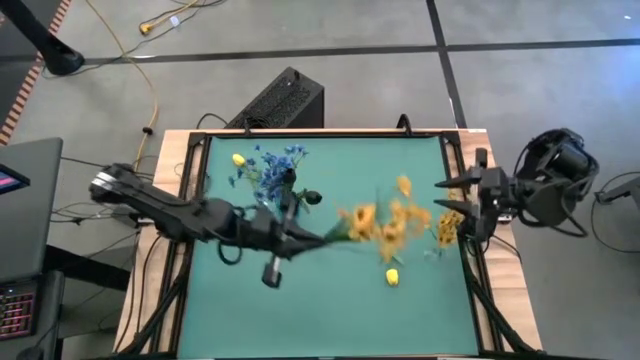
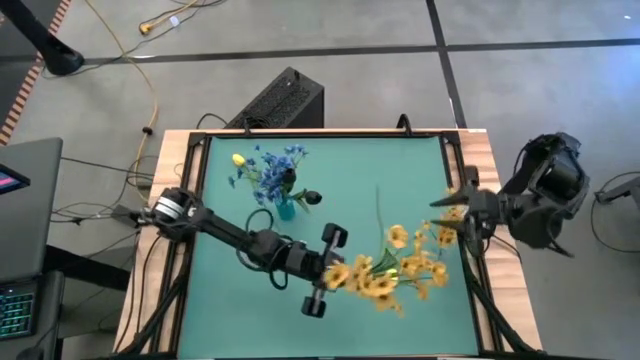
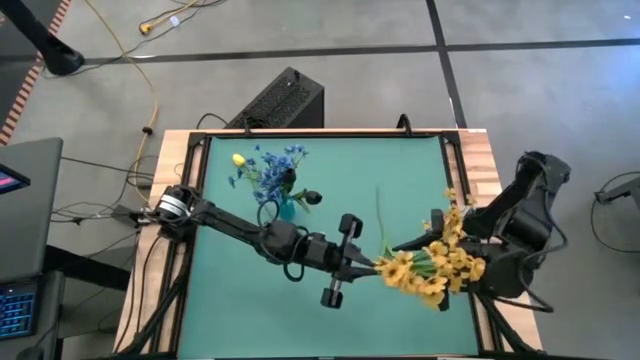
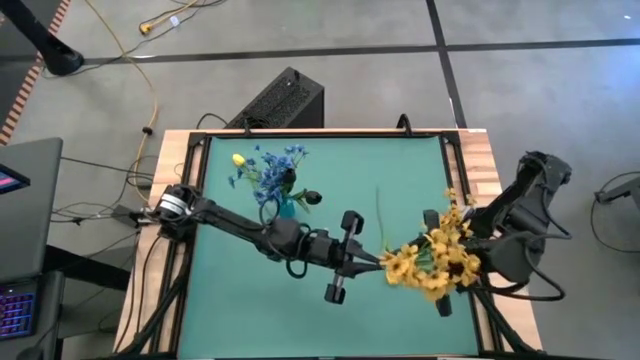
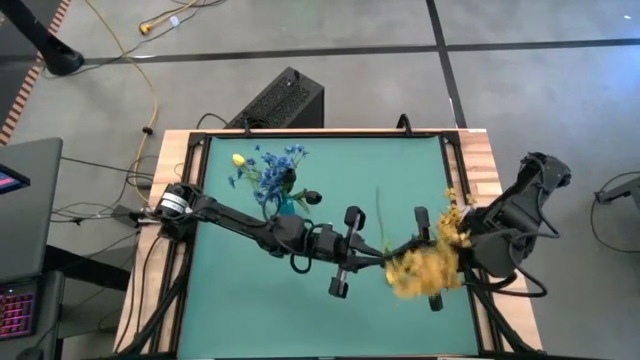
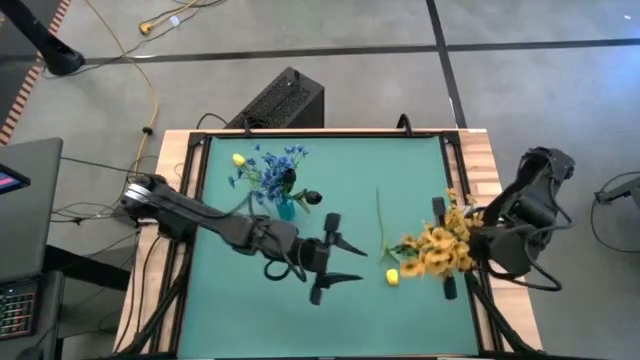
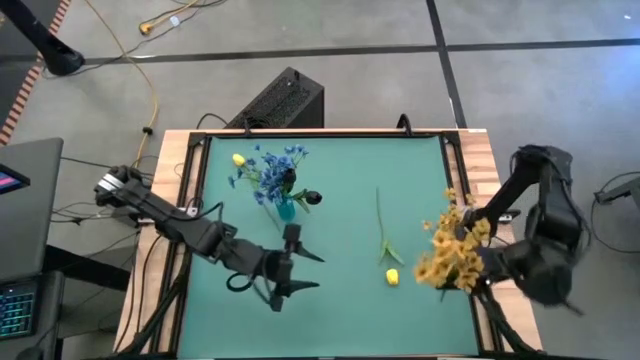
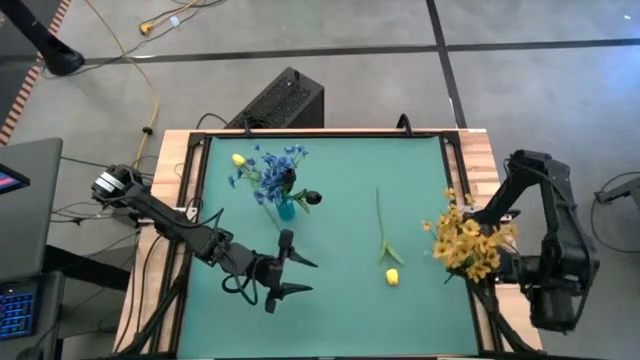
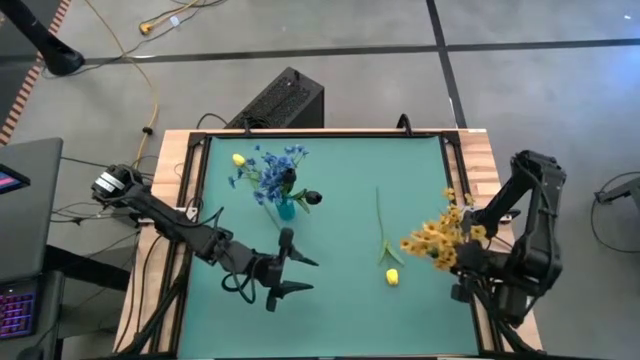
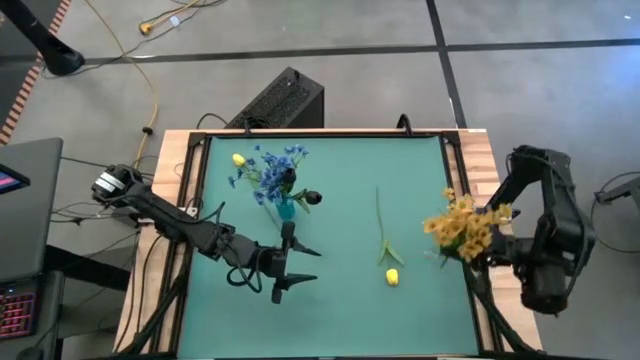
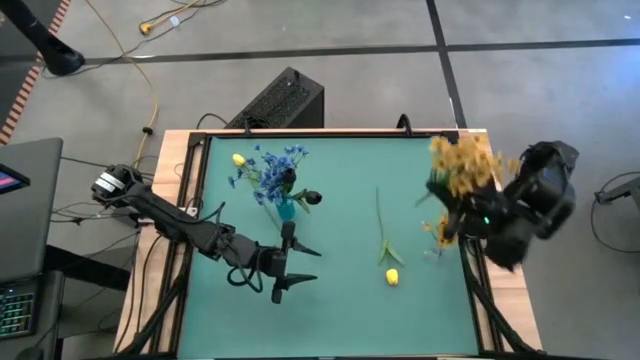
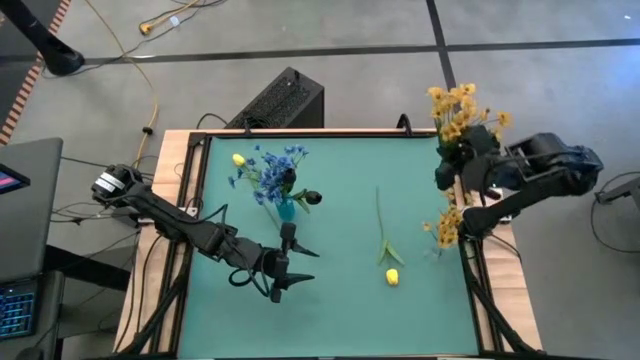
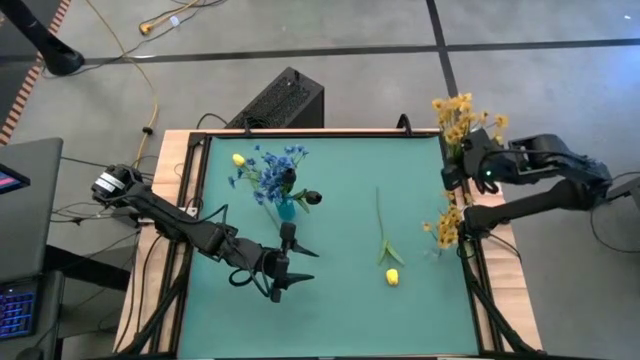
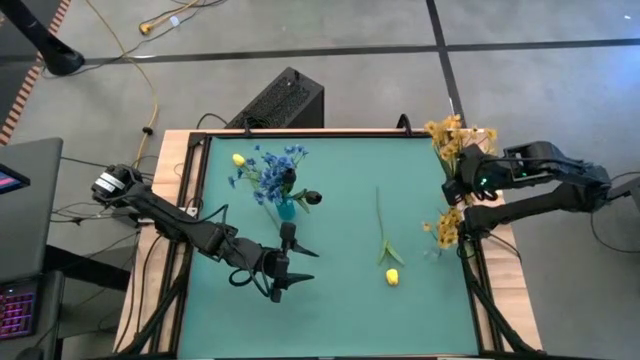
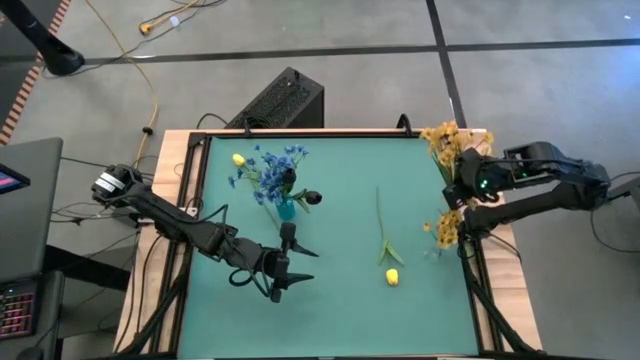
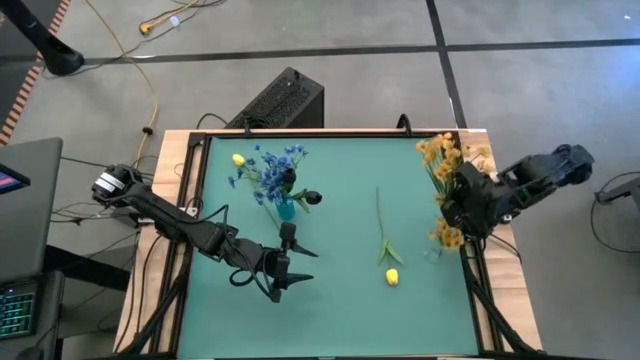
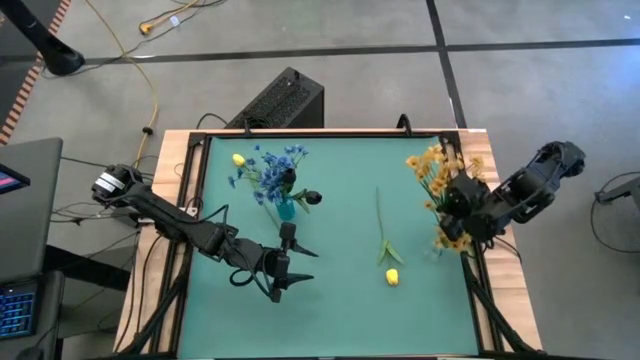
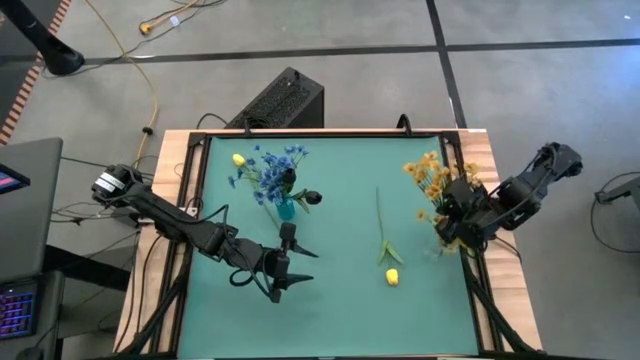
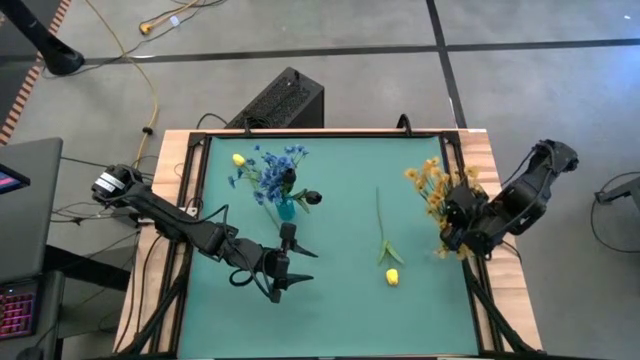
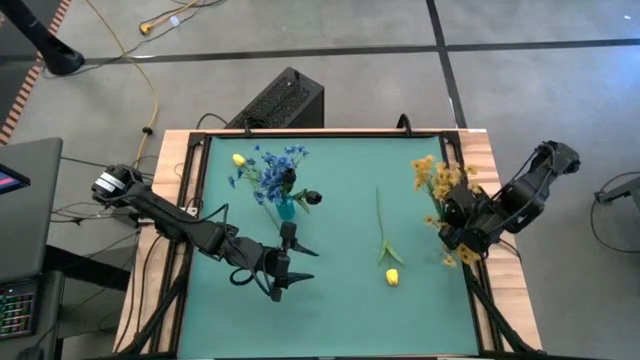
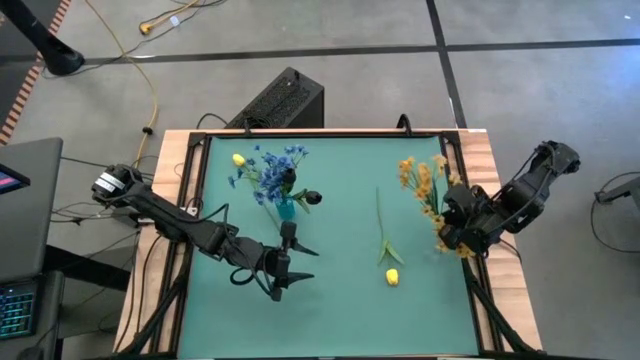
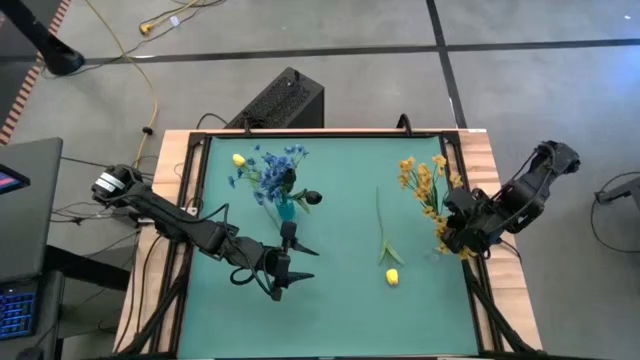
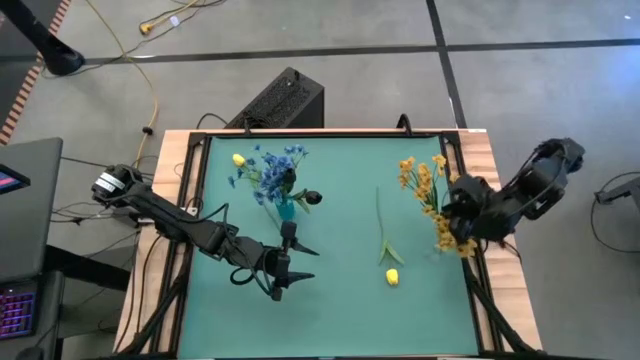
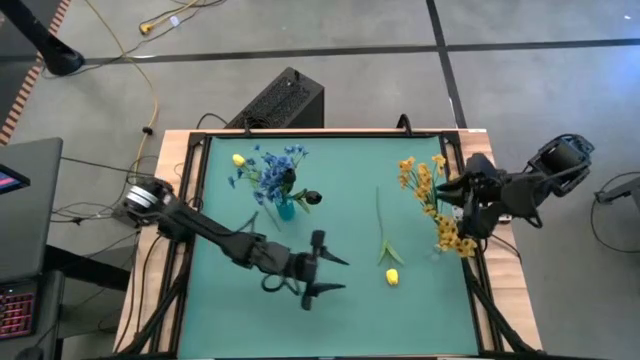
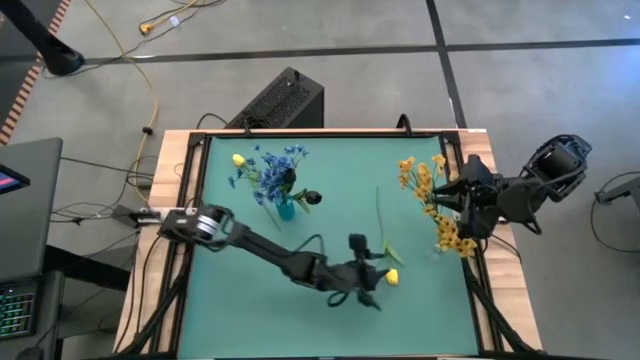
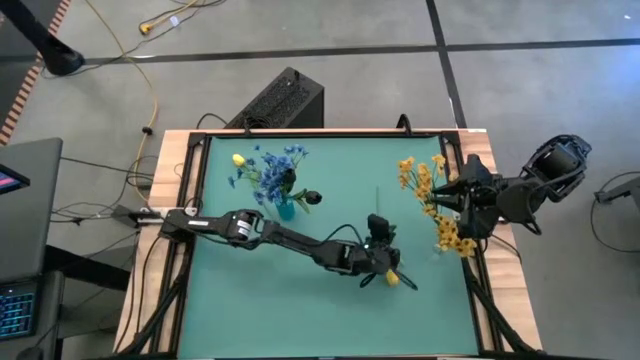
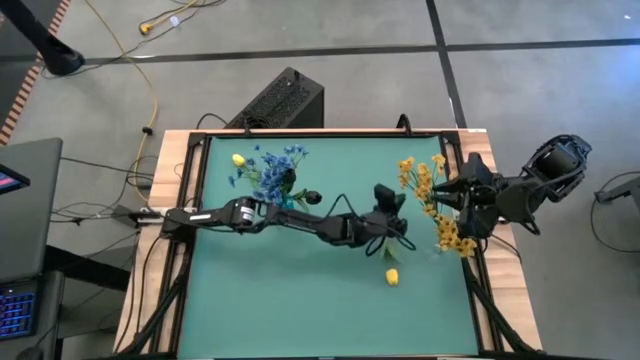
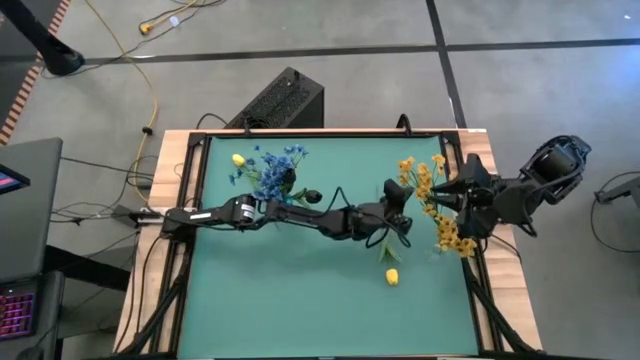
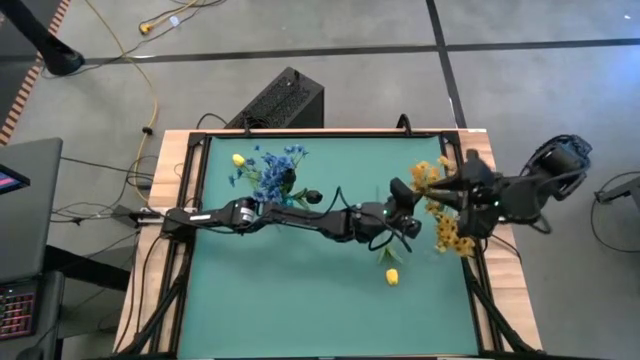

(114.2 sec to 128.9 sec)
Task: Sort flowers into vase by color
Put the yellow flowers into the transparent vase

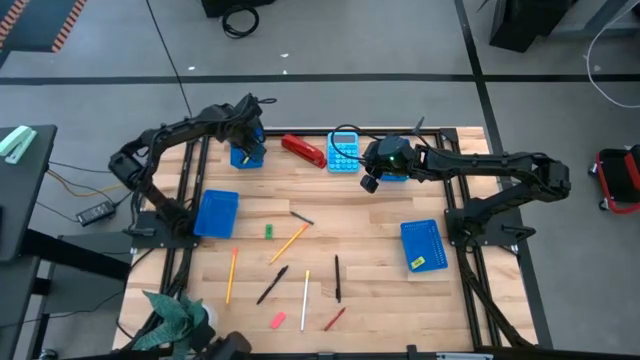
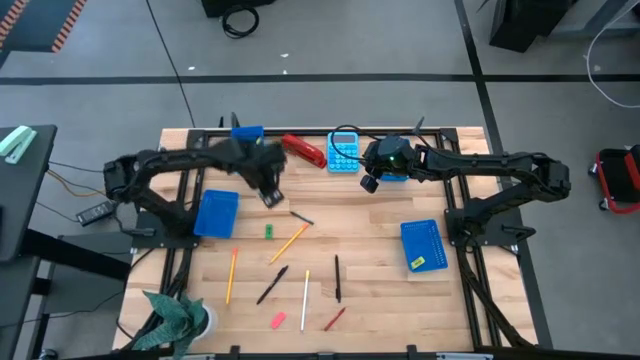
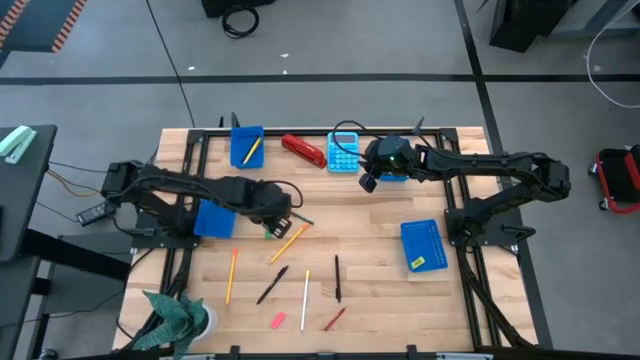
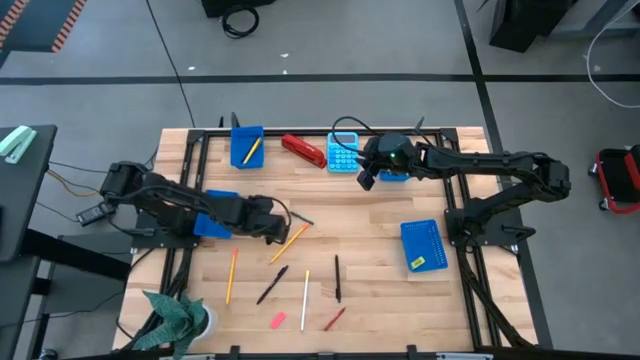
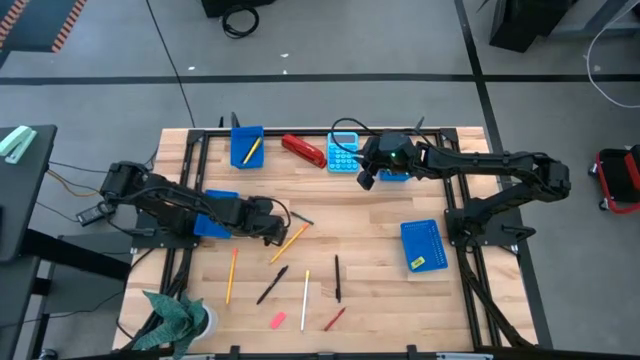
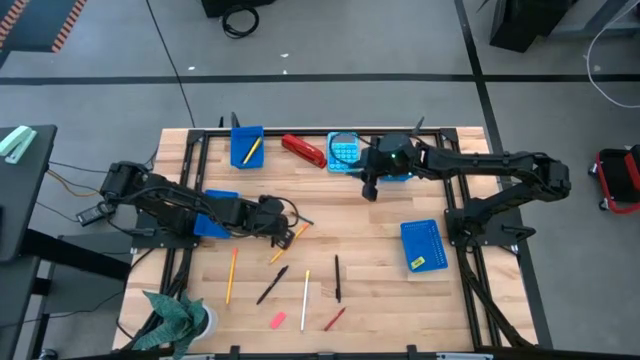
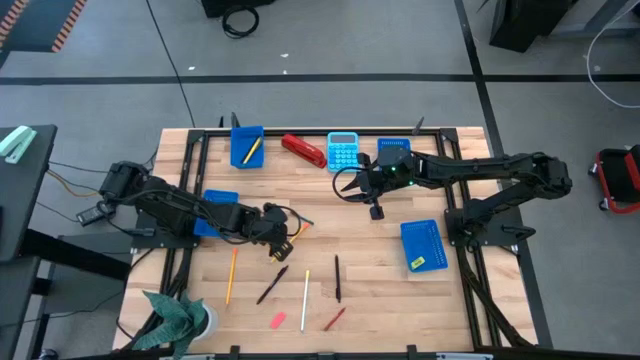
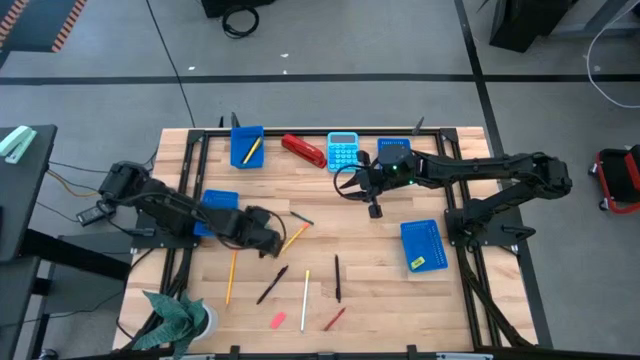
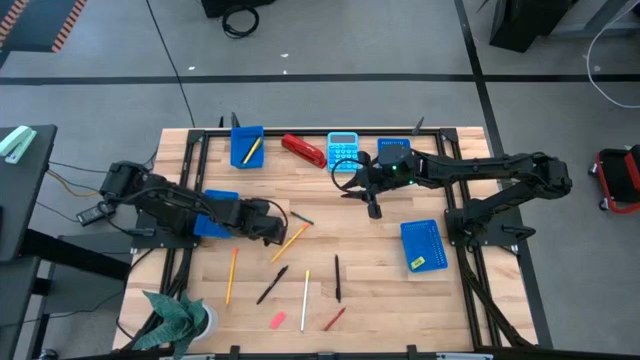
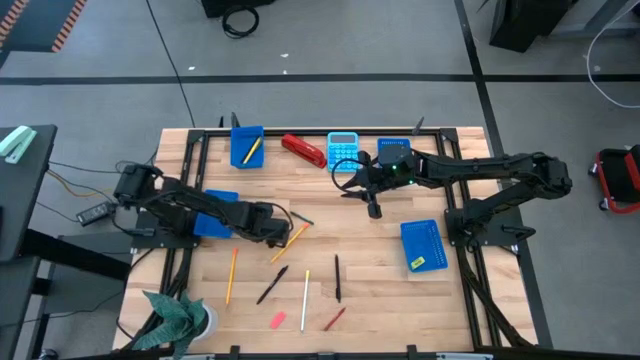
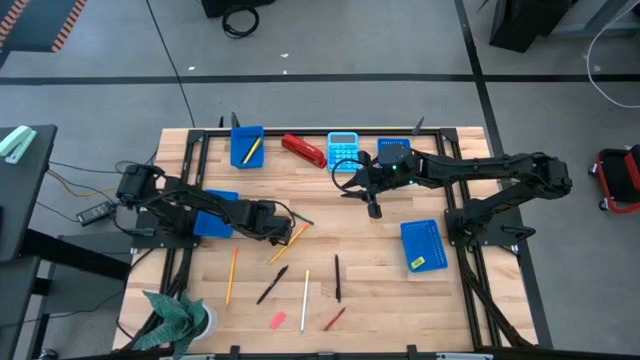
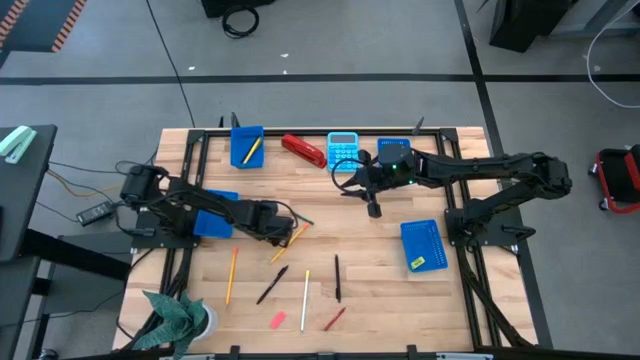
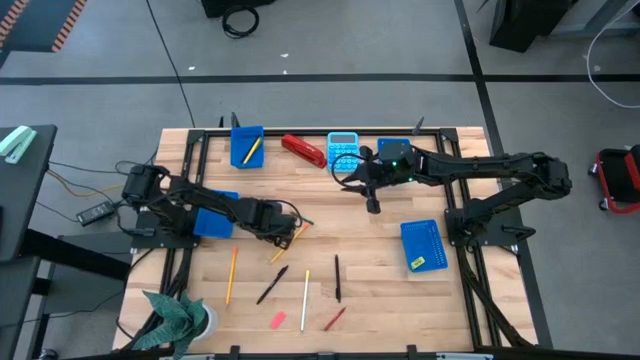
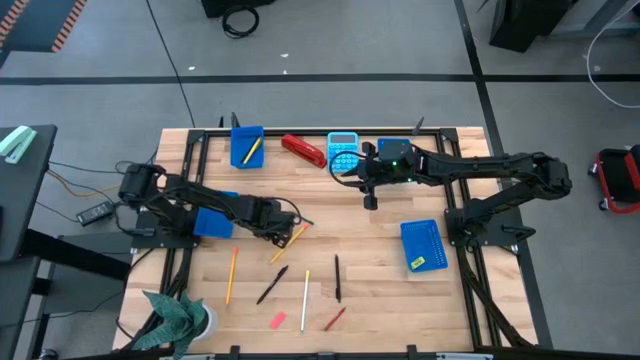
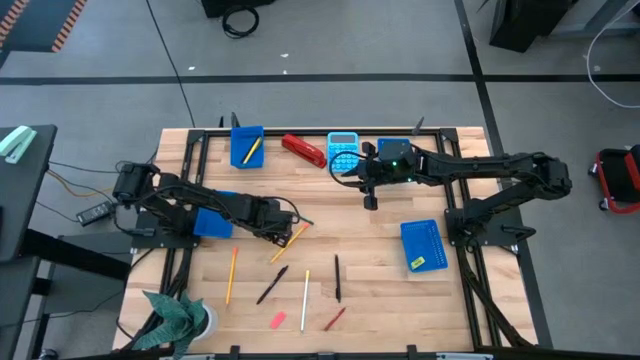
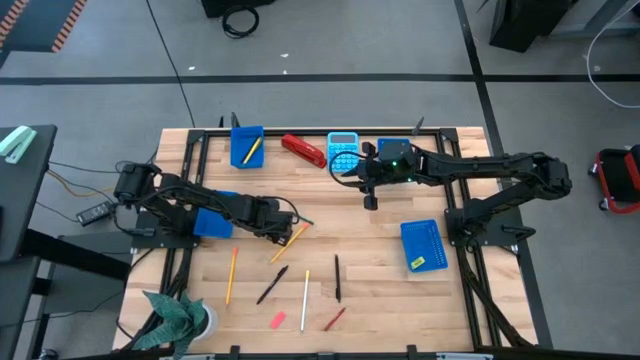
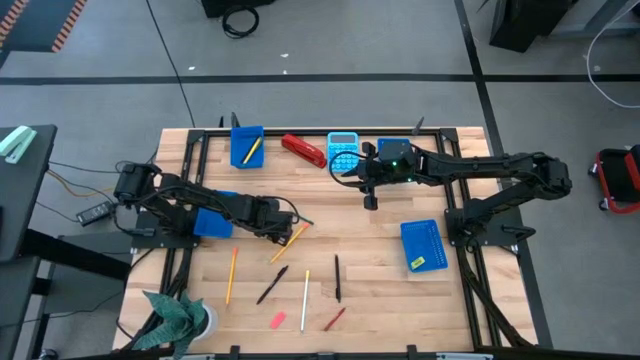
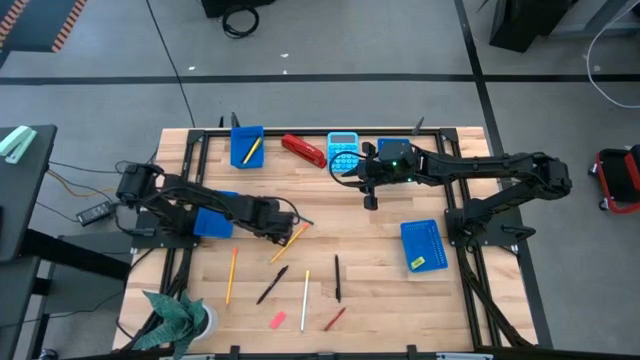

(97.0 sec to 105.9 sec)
Task: Sort crayons/erasers/pens/pencils in bins
Put the green eraser into the bottom right bin
